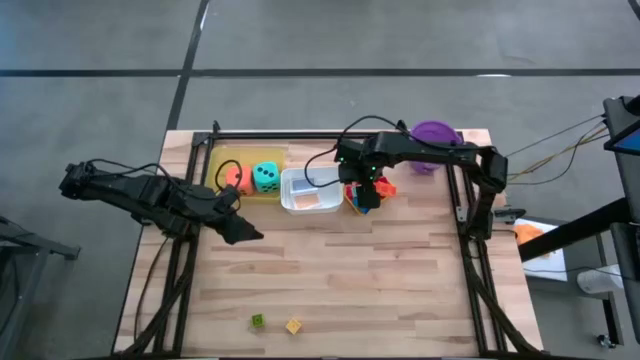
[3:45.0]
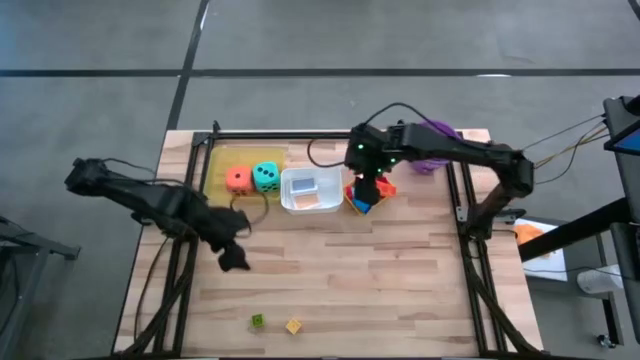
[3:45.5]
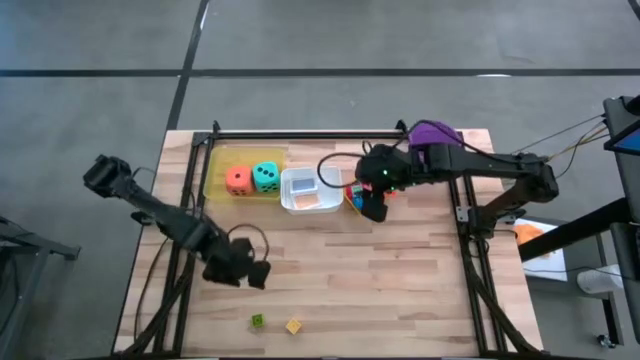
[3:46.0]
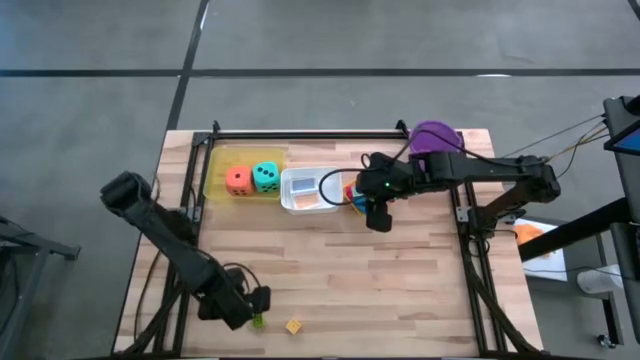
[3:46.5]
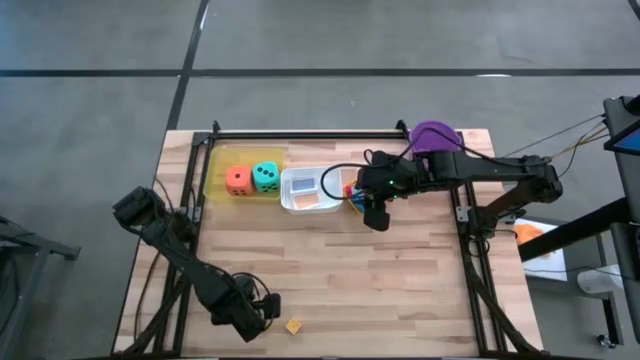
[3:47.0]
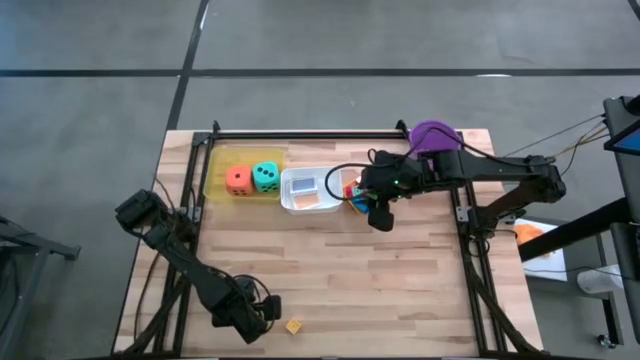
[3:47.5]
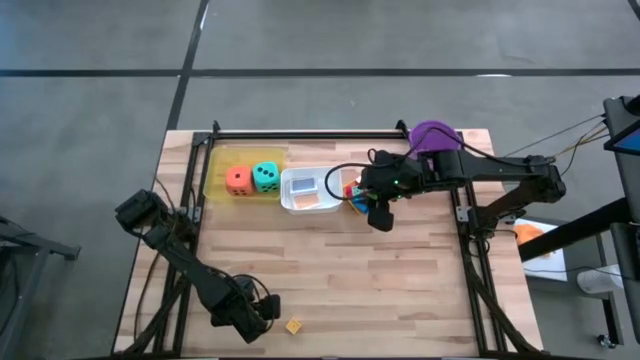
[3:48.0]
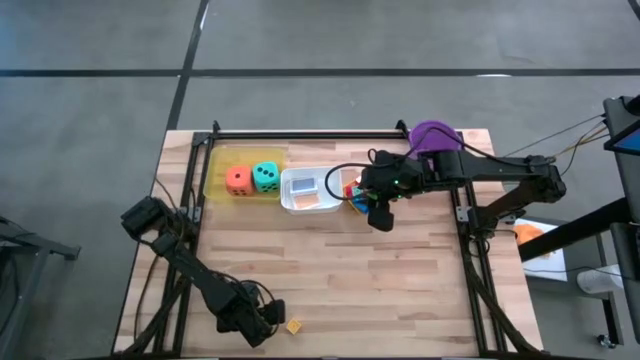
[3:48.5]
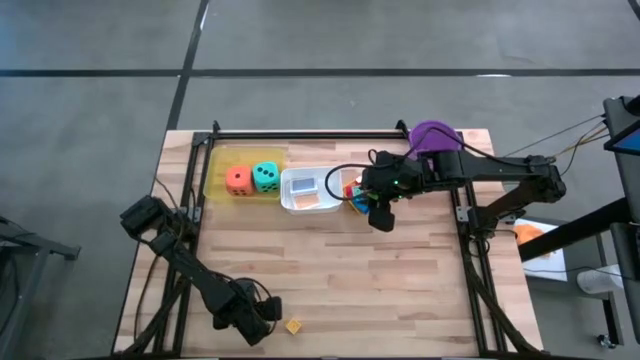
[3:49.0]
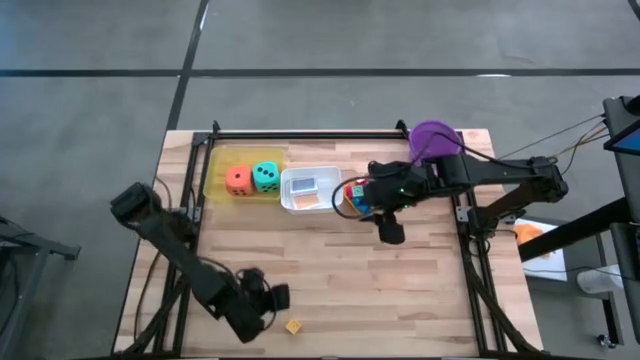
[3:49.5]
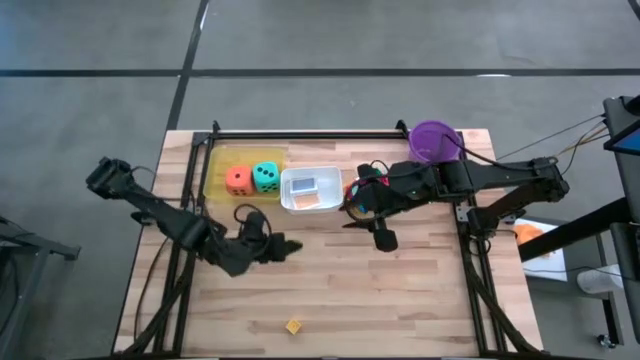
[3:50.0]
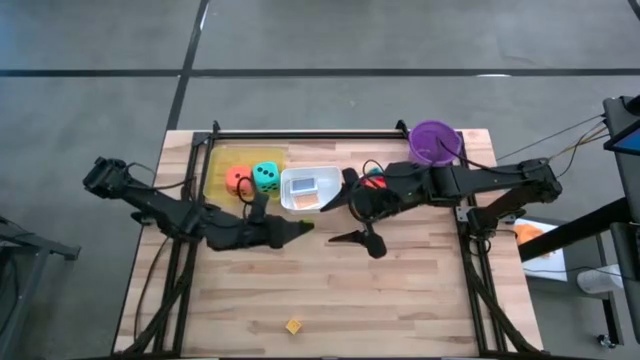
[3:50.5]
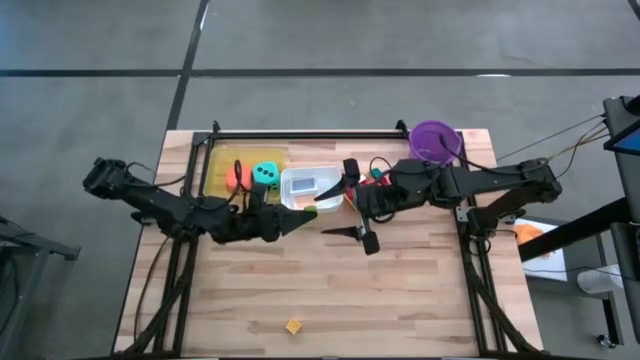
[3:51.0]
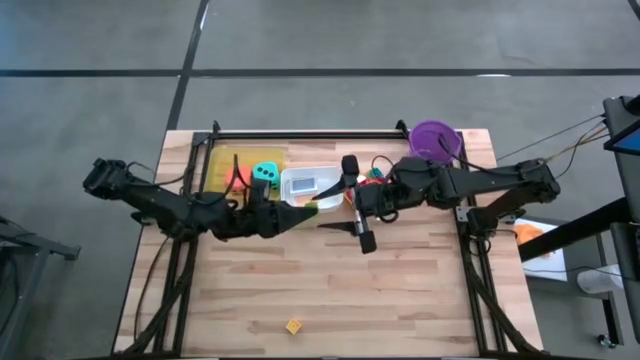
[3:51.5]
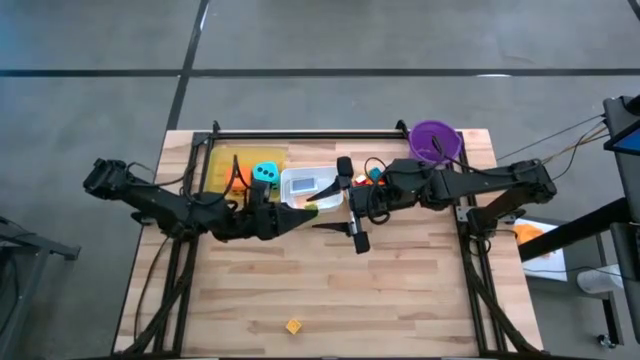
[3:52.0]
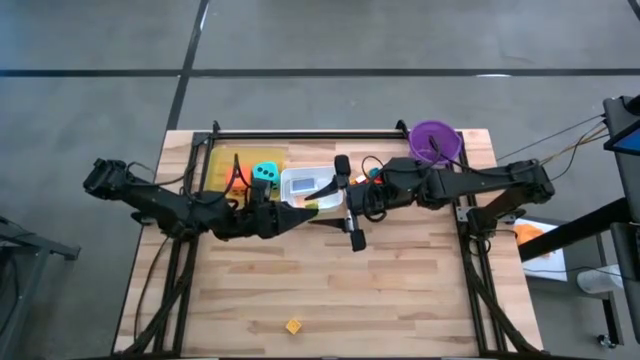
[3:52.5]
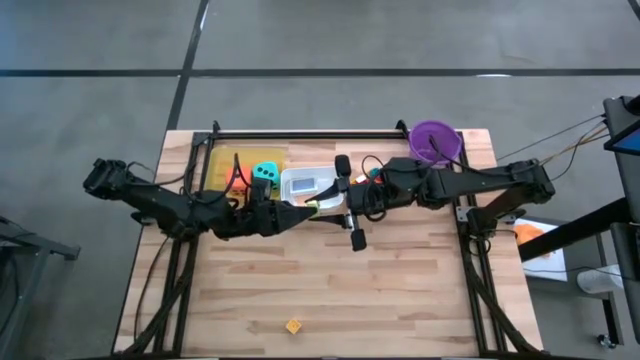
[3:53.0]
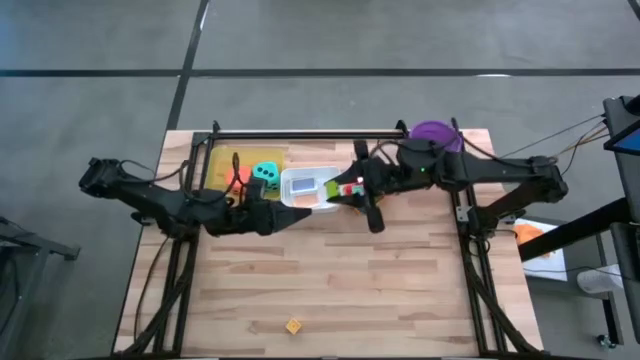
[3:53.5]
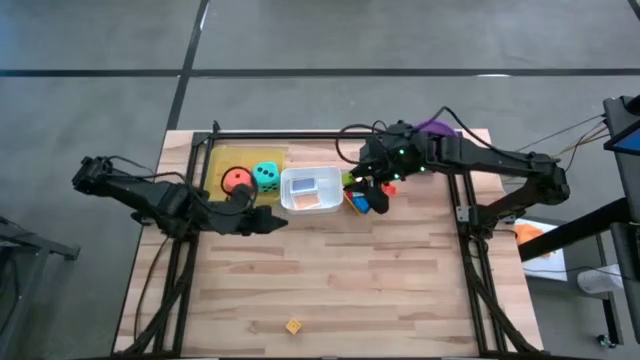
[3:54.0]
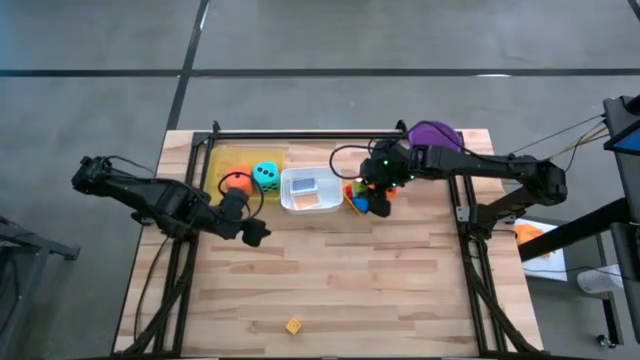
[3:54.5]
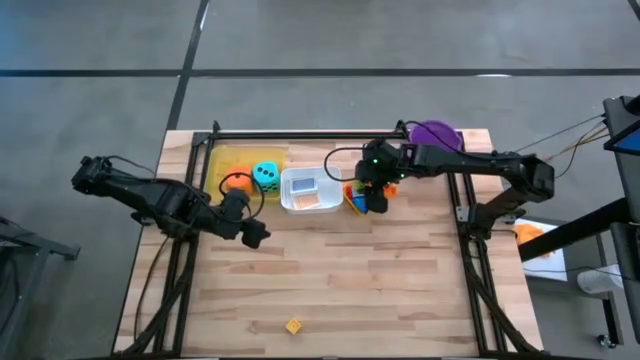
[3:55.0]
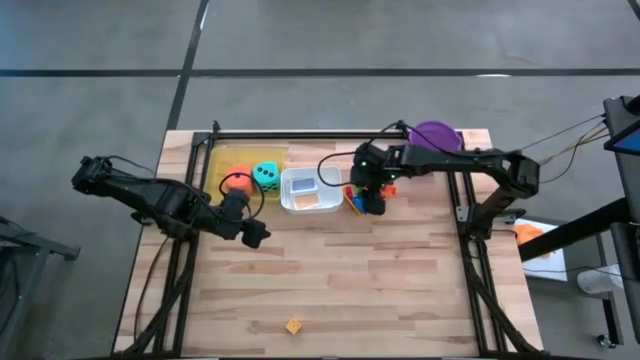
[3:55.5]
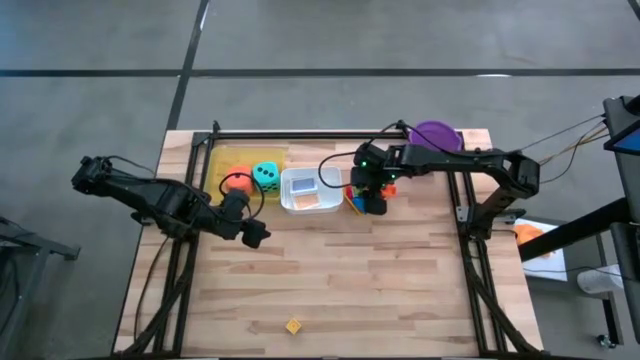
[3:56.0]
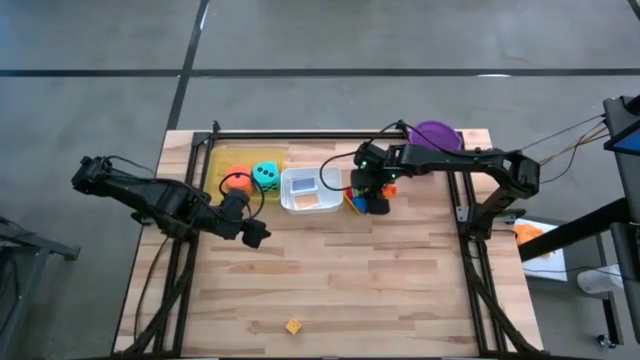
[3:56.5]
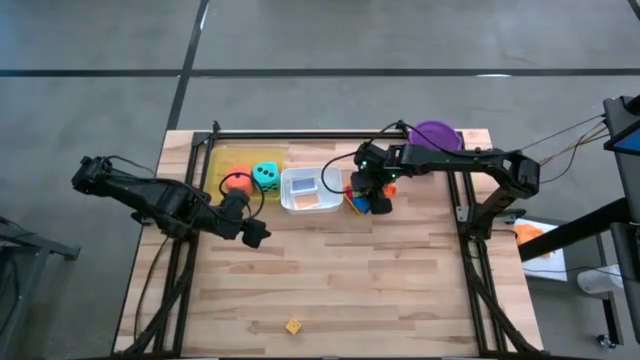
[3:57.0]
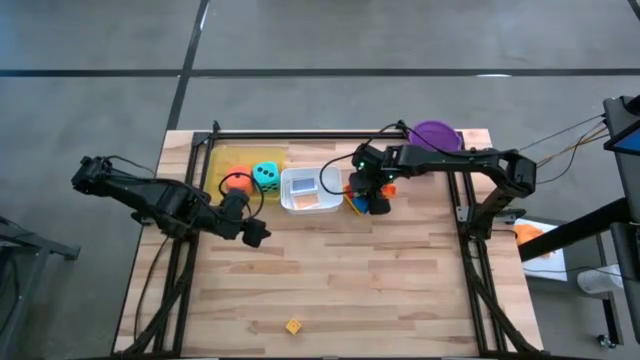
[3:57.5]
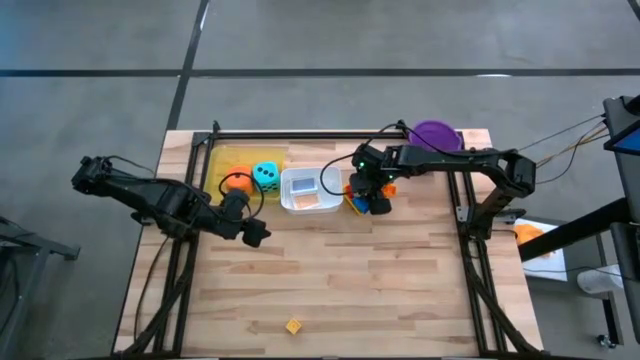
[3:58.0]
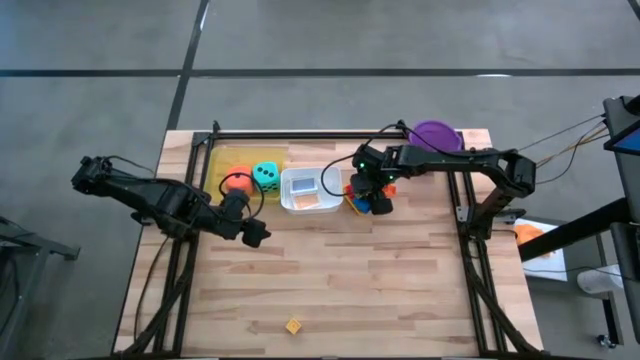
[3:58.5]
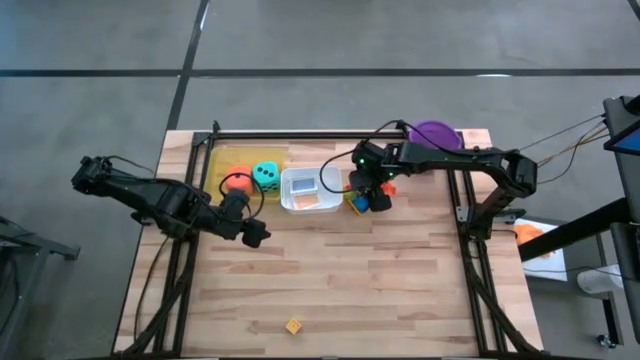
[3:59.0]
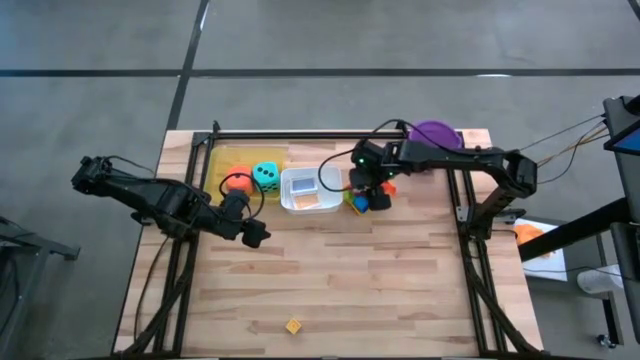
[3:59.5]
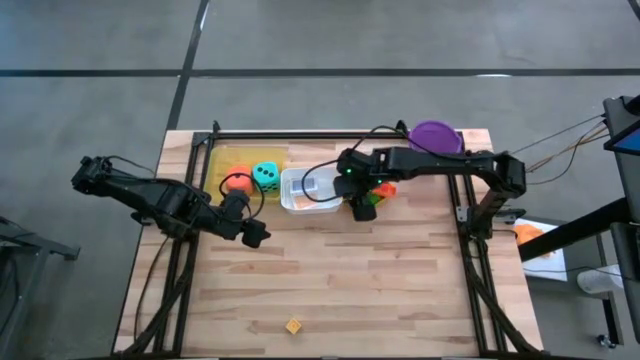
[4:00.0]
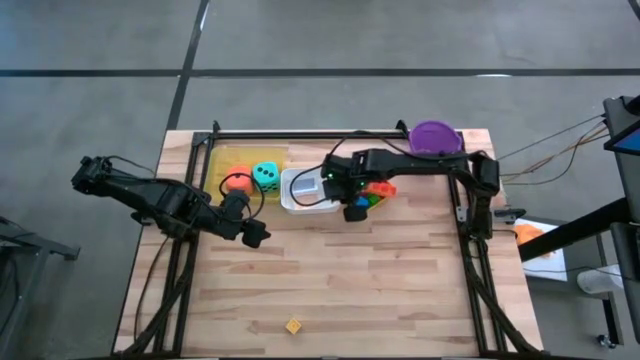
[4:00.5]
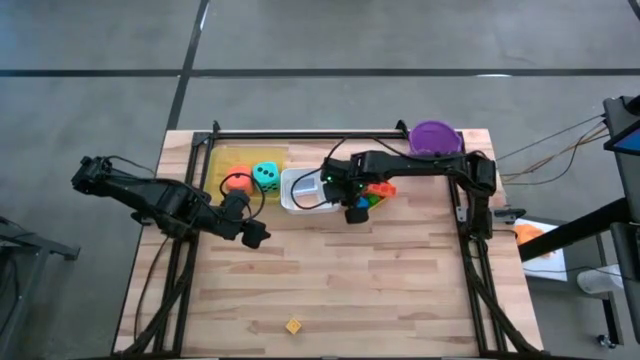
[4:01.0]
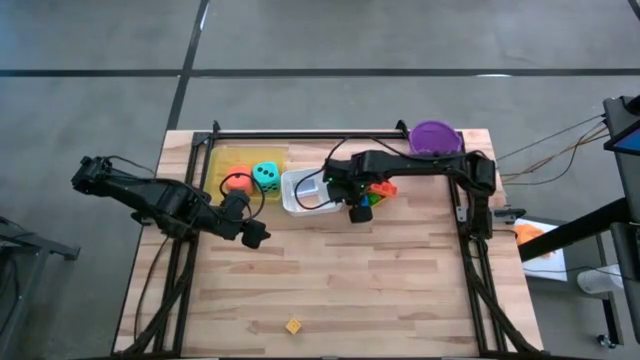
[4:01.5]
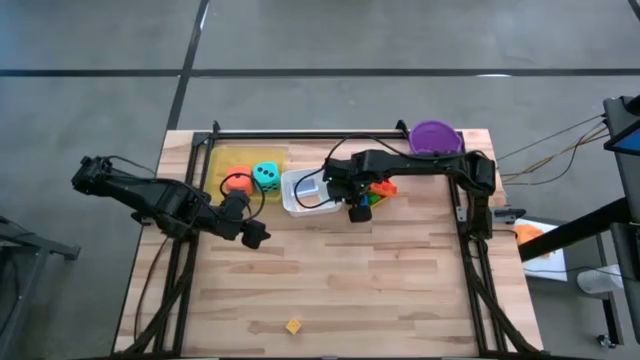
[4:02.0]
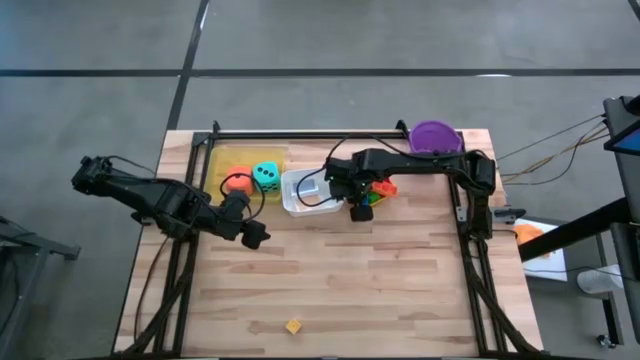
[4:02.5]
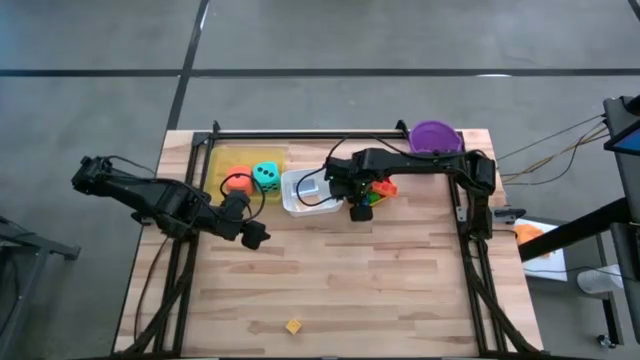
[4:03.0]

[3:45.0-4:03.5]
Task: Pick & Place Toys
Put the green game piece into the yellow bin

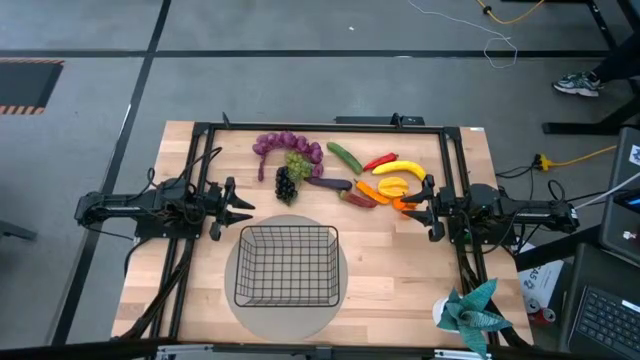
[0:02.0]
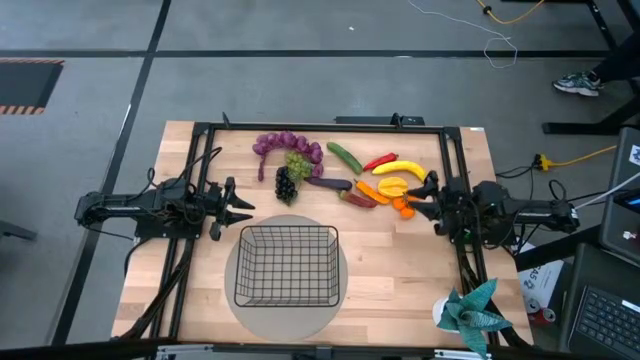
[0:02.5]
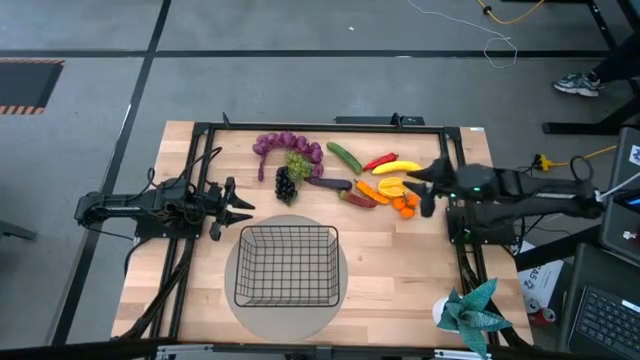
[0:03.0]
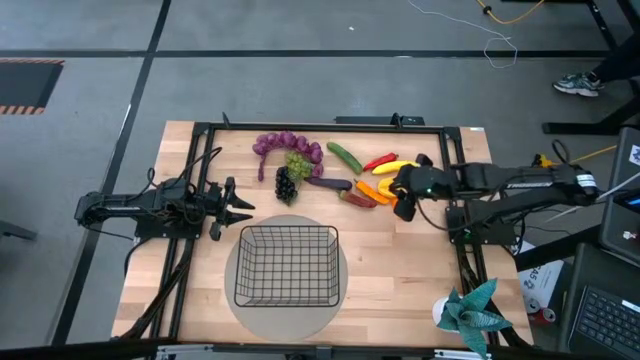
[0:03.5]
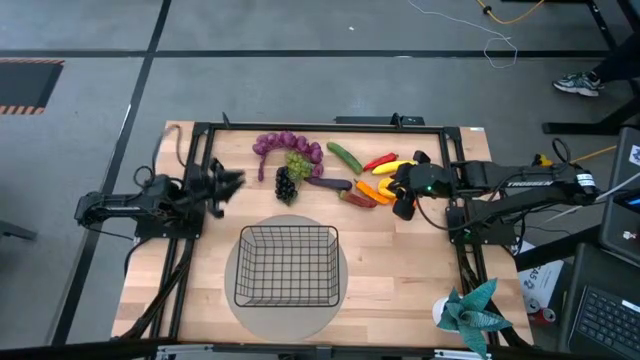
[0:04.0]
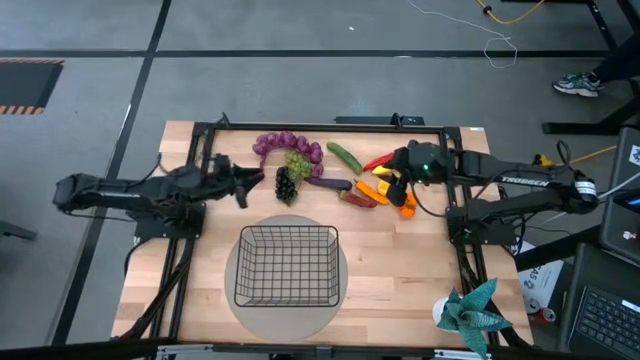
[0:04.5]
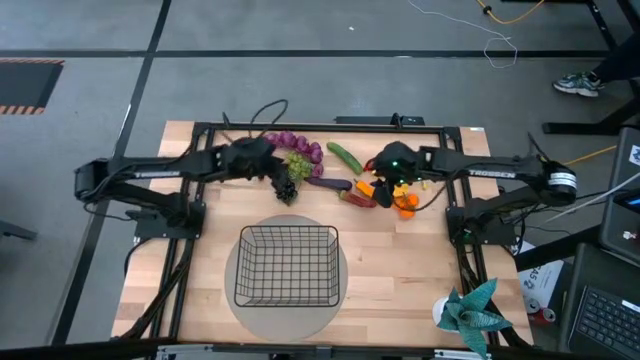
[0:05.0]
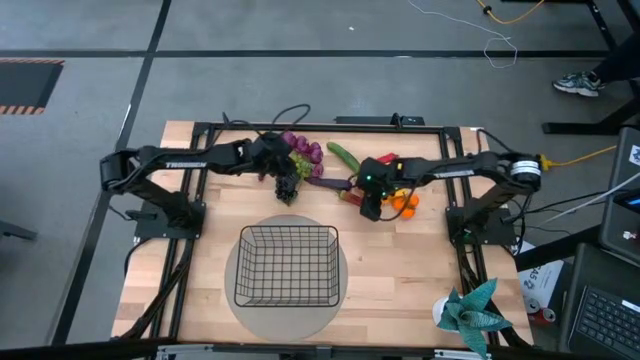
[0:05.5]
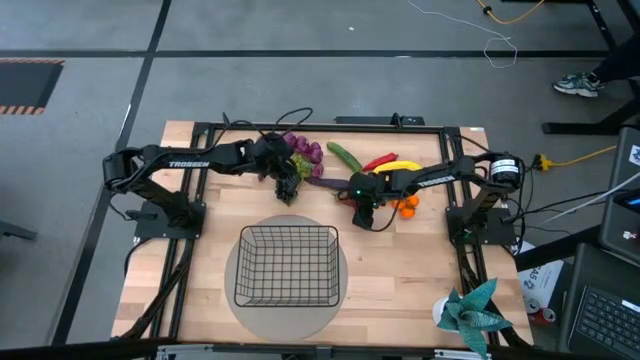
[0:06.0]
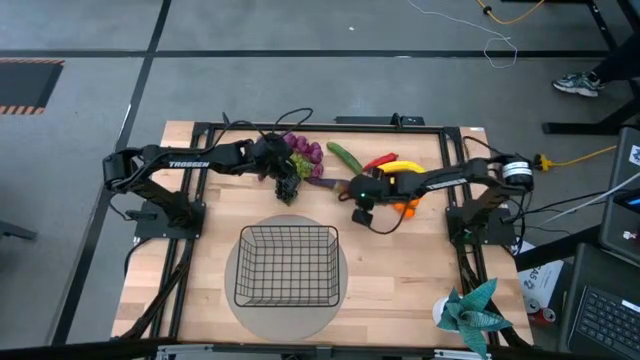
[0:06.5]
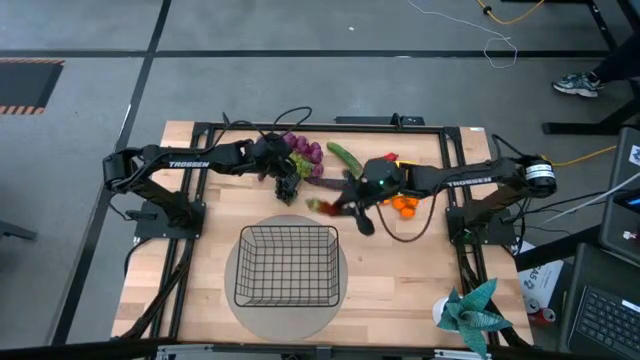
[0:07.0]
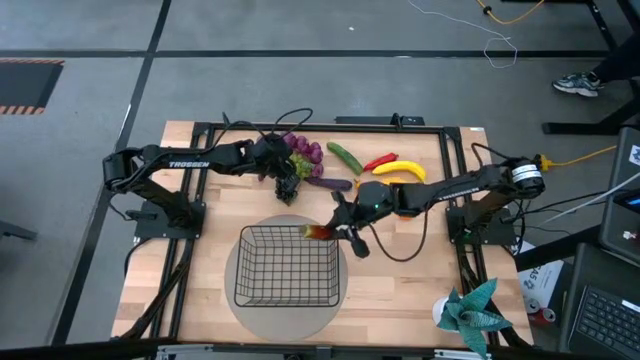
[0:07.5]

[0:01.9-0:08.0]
Task: Build produce basket
Put the dark red chili pepper into the black wire basket
